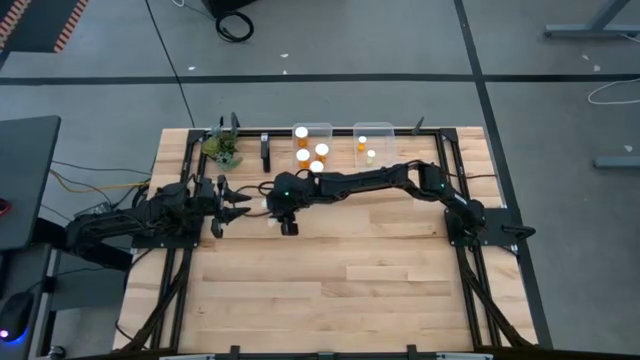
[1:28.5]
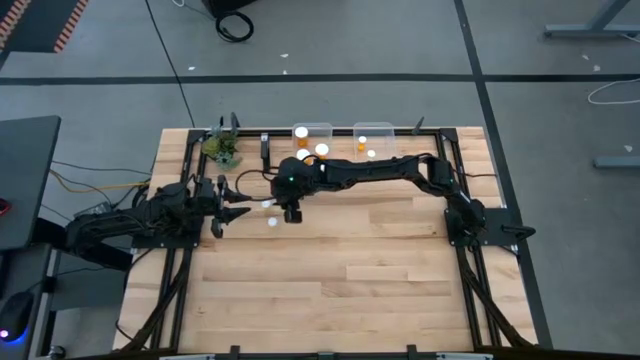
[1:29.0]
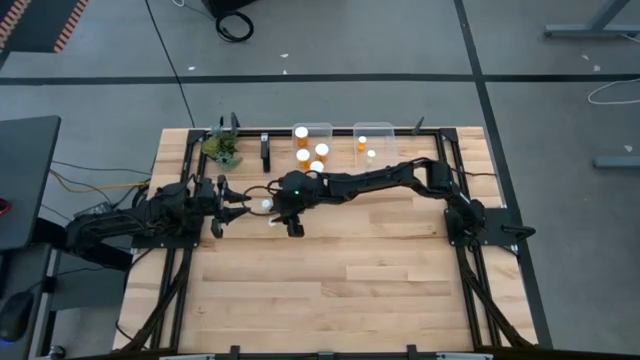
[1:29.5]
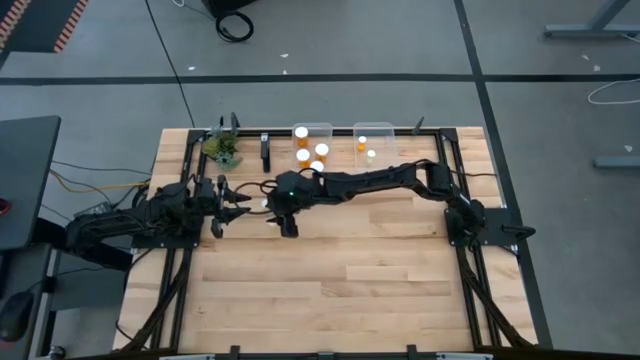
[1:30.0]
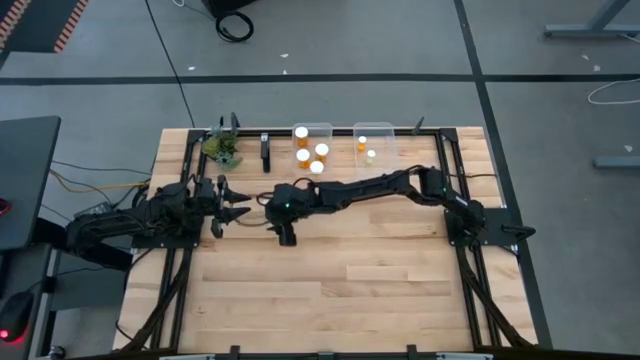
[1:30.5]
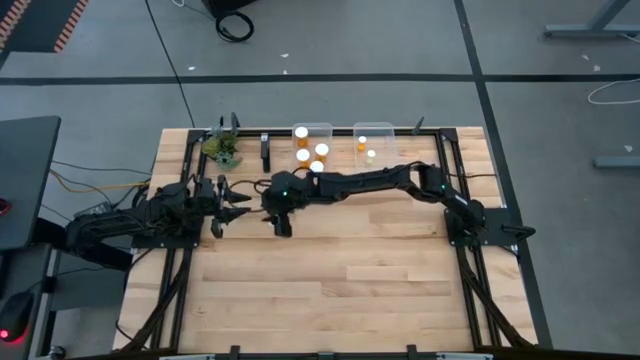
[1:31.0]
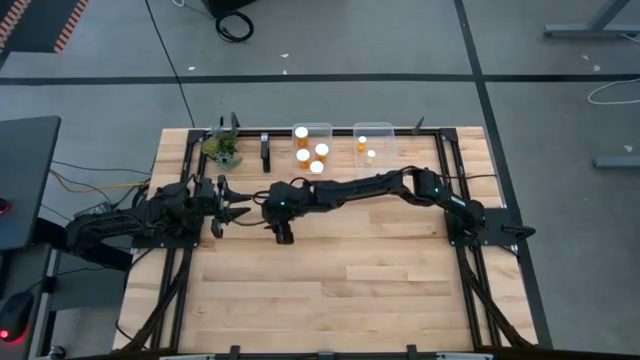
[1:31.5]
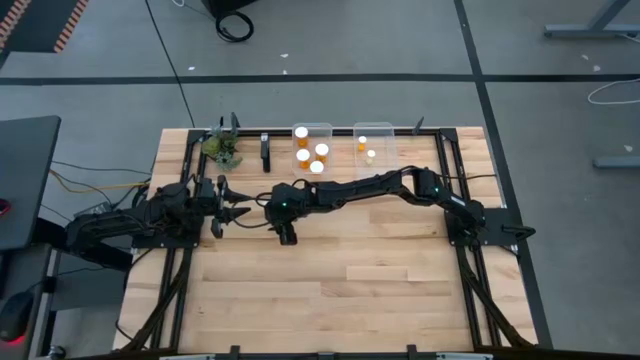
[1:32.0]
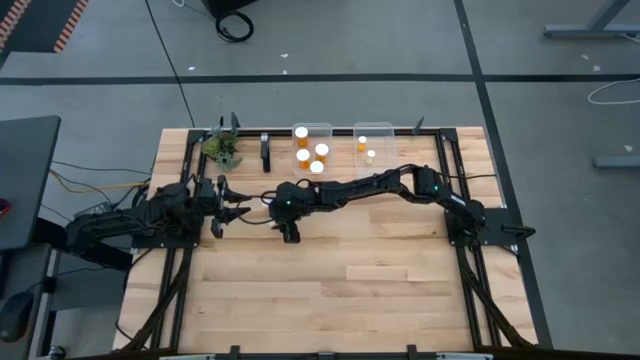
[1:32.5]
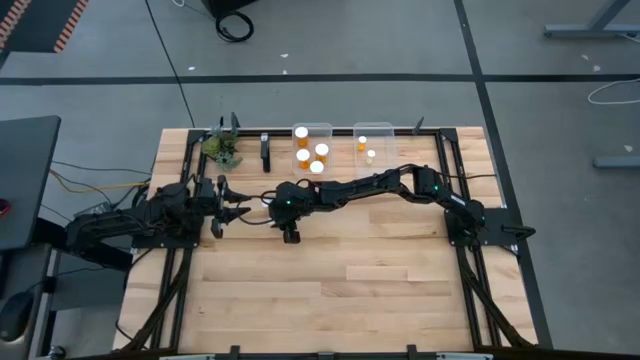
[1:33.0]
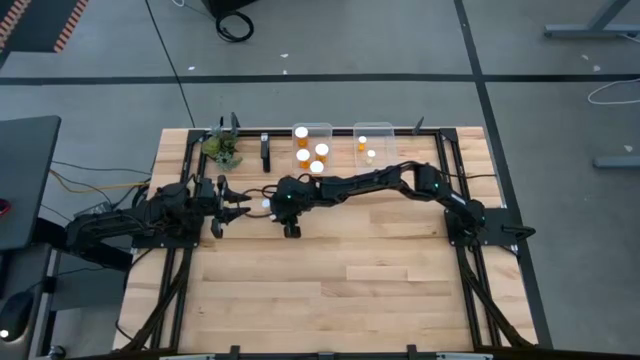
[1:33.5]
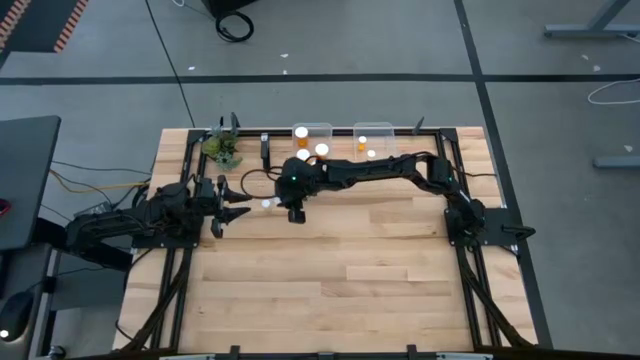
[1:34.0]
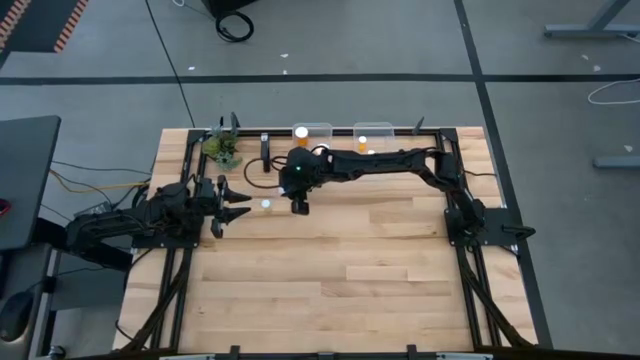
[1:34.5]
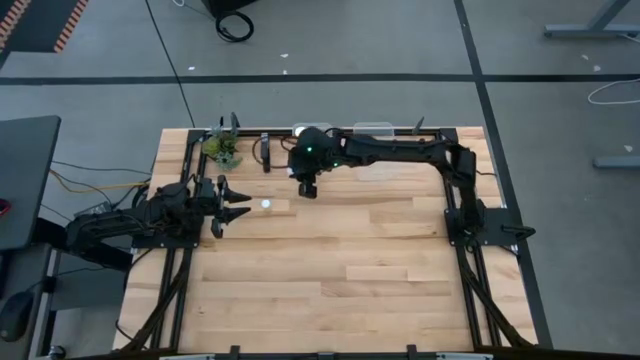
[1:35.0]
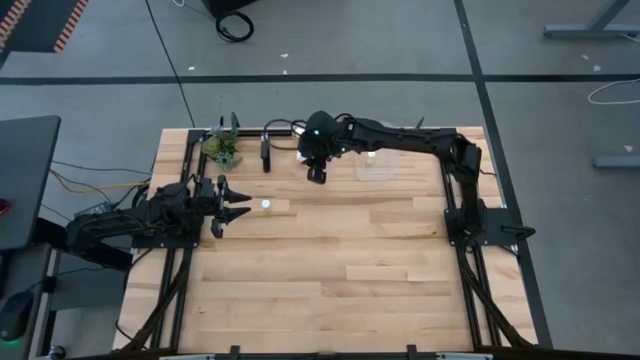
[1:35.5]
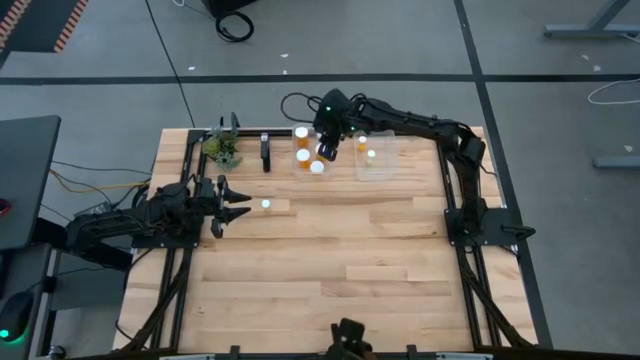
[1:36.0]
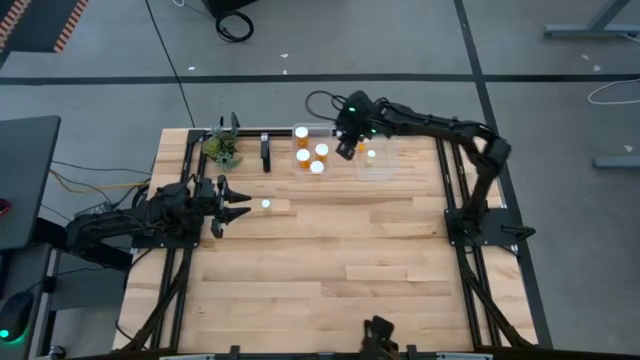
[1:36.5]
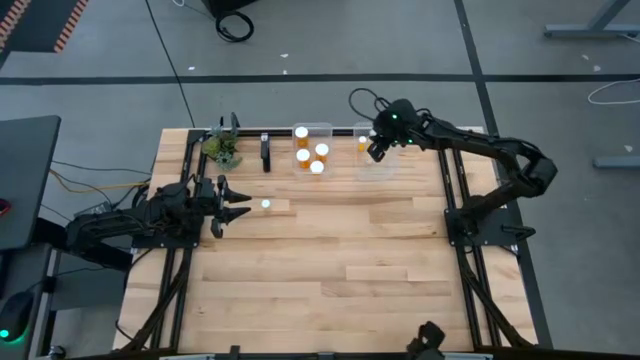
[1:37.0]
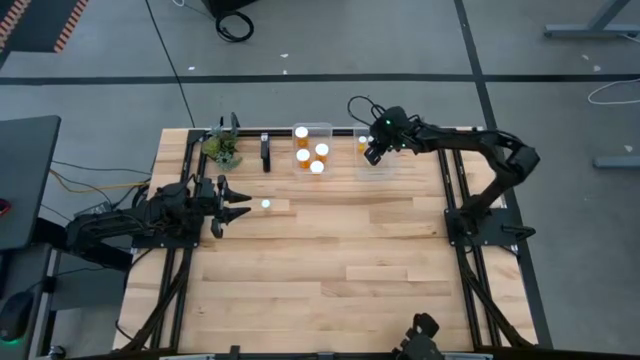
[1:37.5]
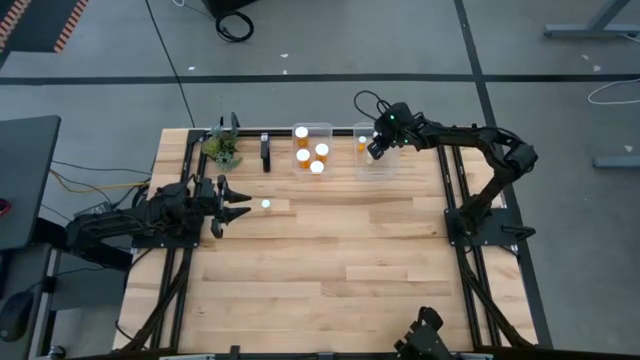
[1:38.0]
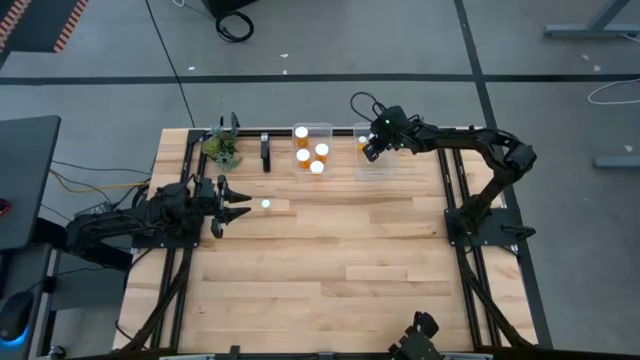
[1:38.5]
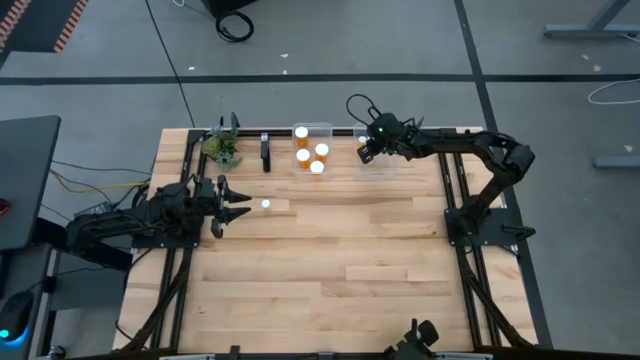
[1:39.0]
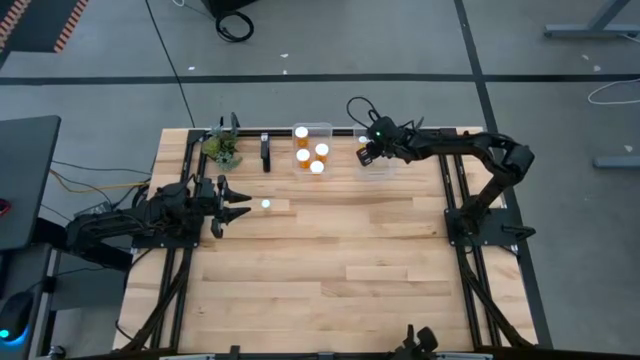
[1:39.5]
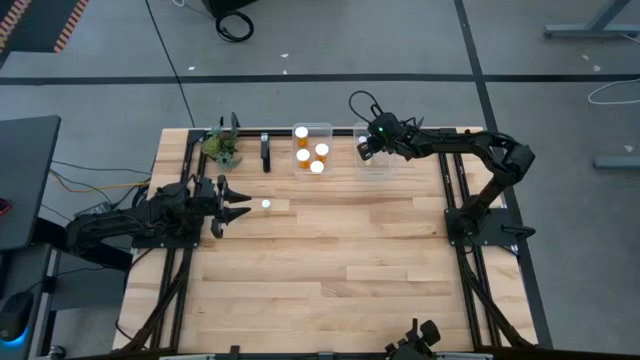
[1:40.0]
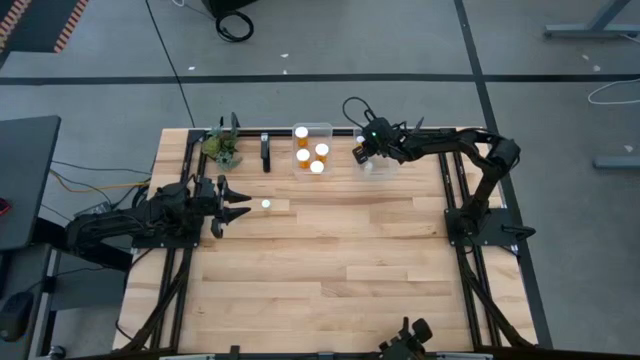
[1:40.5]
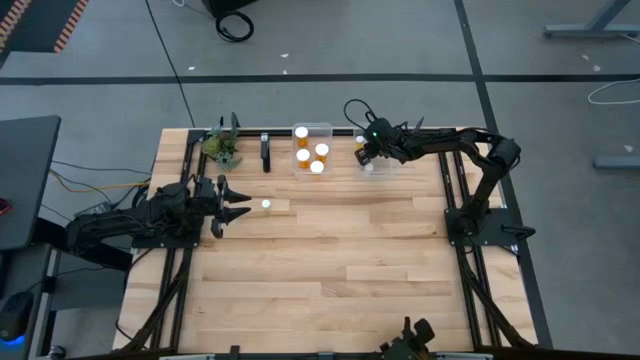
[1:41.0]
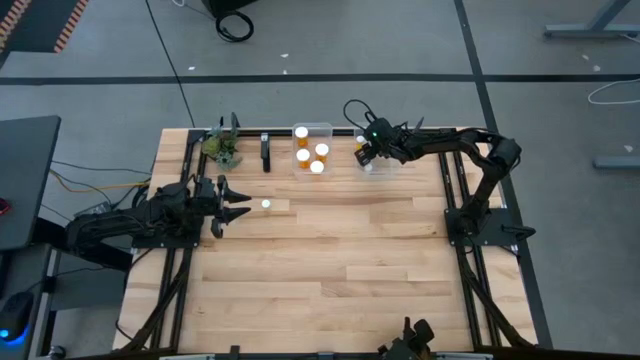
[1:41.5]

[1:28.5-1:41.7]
Task: Pick and place medicine bottles into bin by pill shape (circle, oval)
Put the small yellow pill bottle into the right transparent bin

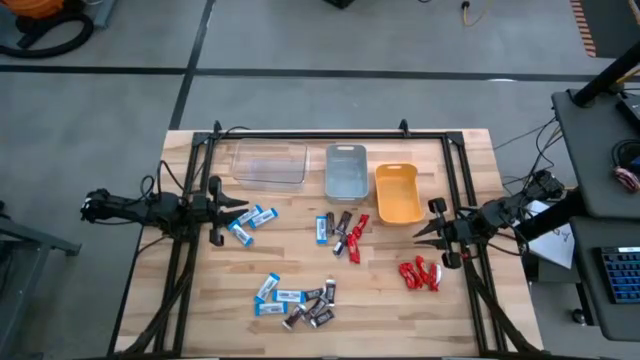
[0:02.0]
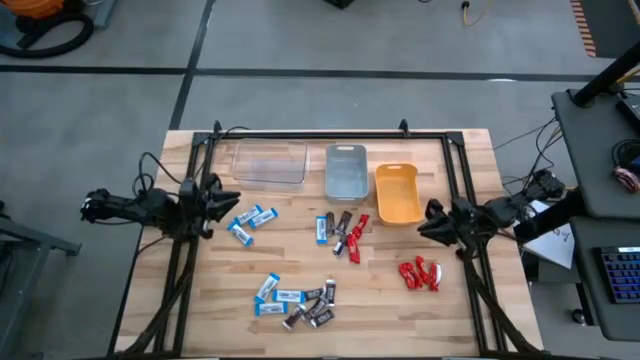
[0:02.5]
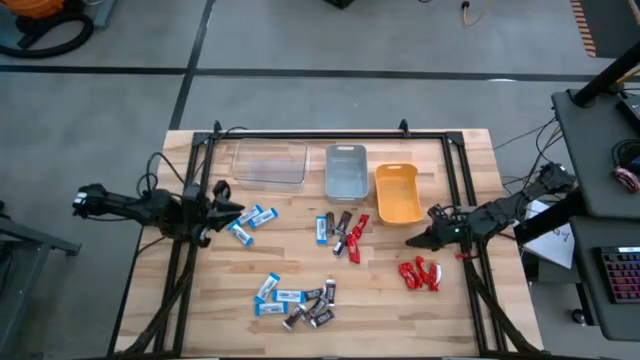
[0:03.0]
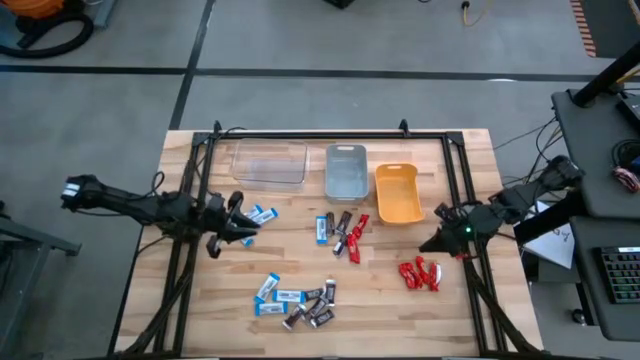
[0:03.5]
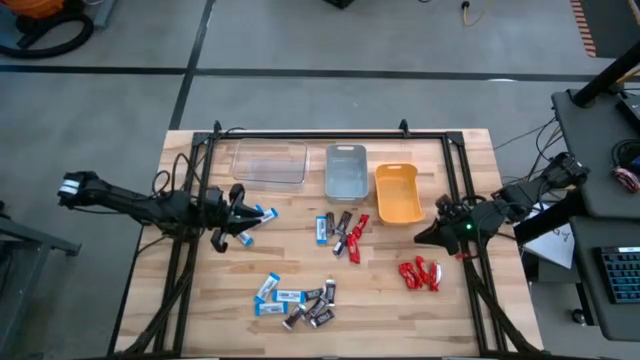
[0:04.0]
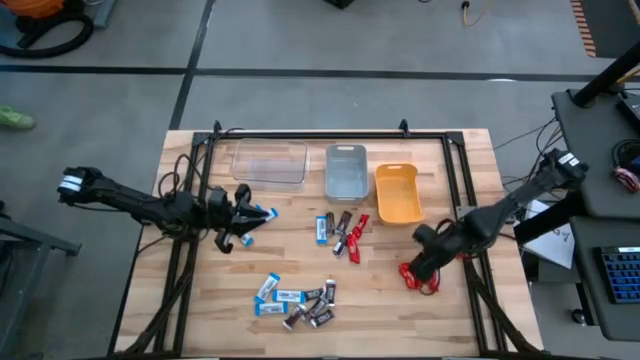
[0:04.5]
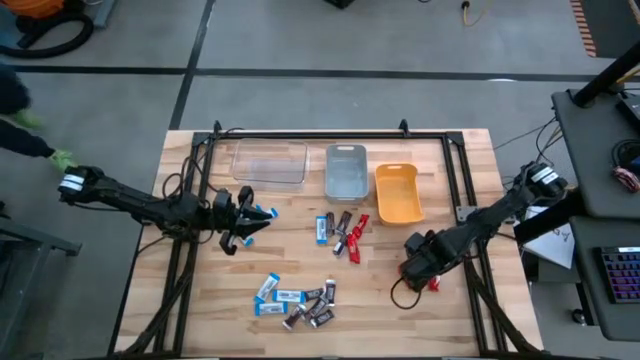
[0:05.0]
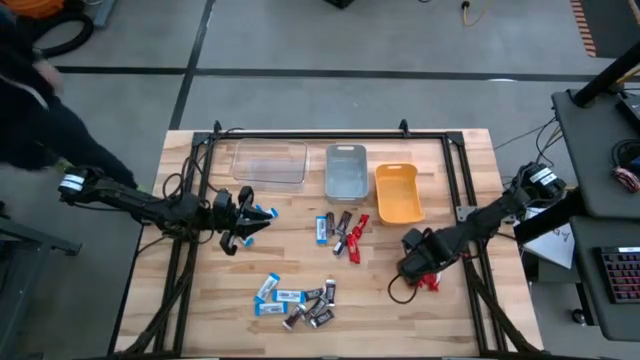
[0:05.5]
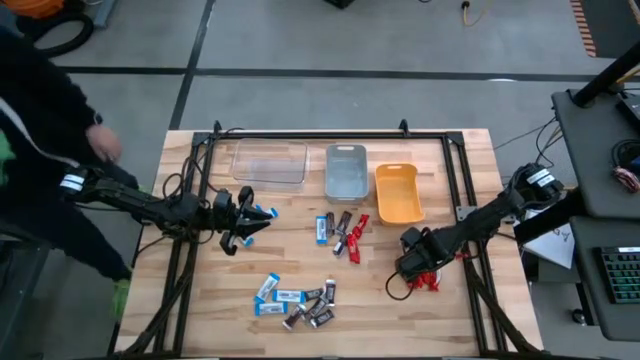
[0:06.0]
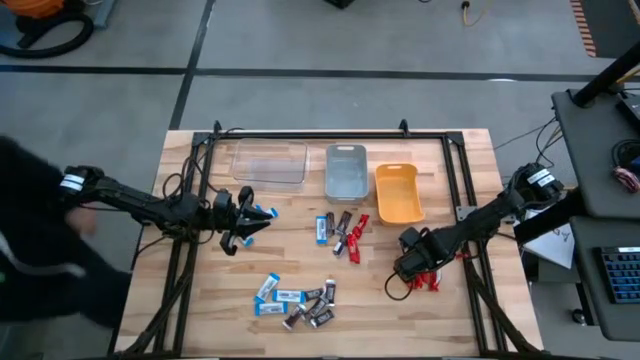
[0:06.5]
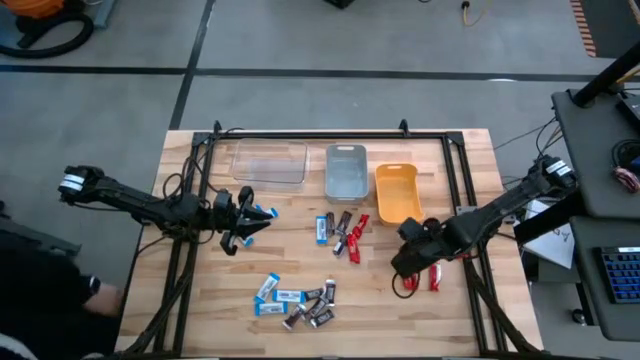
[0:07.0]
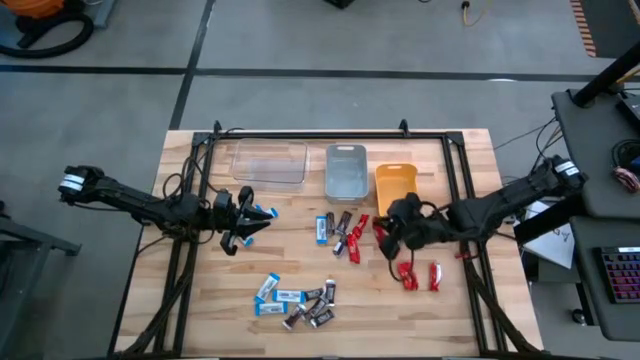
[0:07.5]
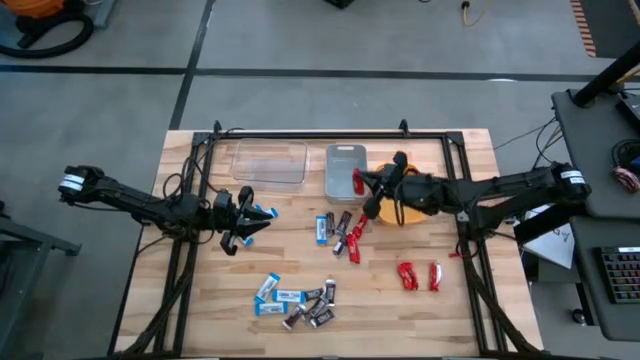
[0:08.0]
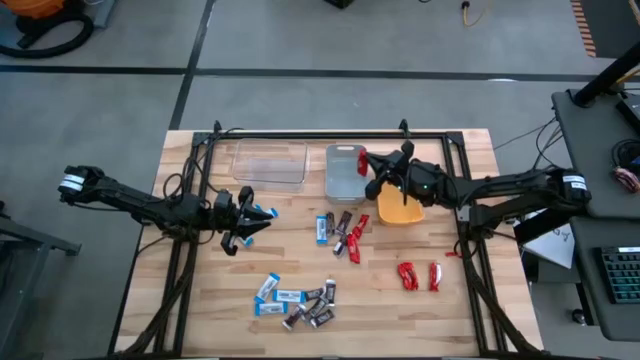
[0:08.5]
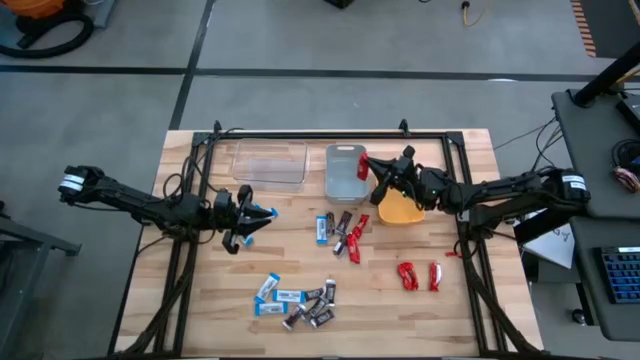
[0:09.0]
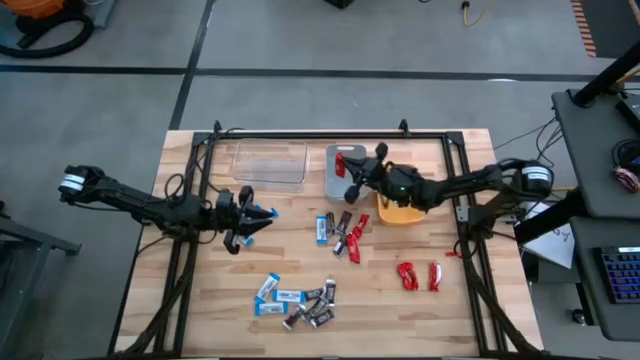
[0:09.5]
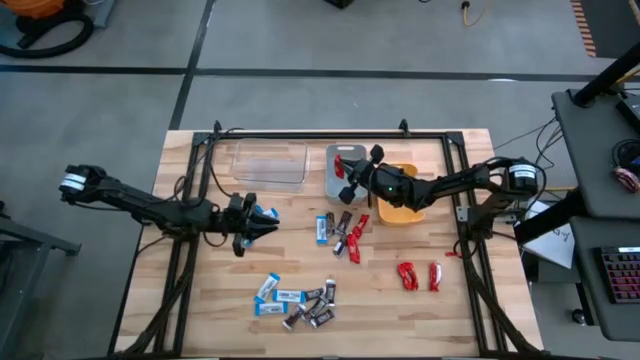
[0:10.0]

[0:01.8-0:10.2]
Task: Organize candy in baskets
Put the red chocolate into the gray bin
